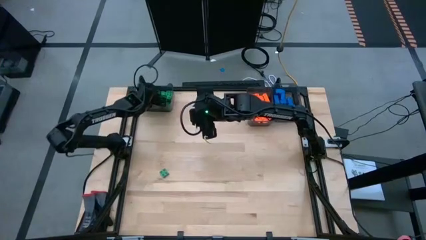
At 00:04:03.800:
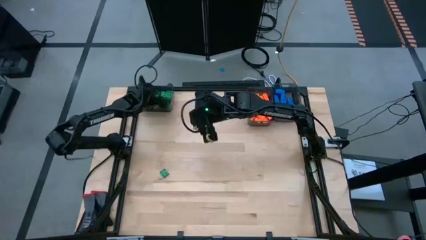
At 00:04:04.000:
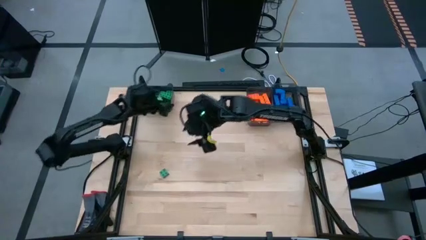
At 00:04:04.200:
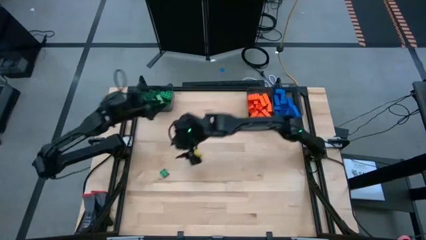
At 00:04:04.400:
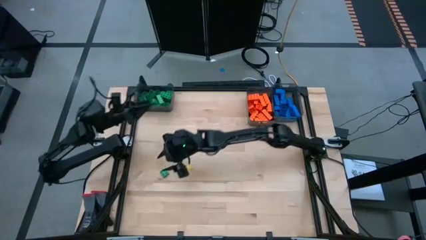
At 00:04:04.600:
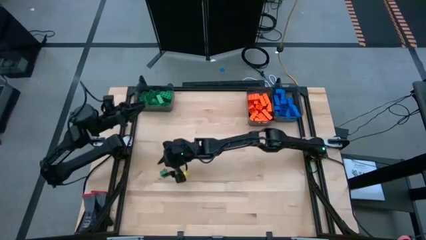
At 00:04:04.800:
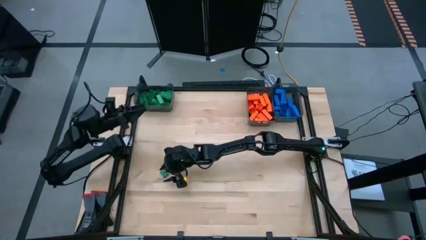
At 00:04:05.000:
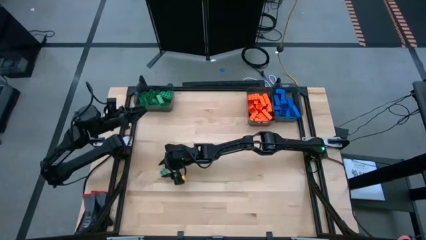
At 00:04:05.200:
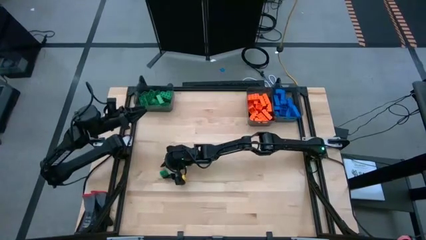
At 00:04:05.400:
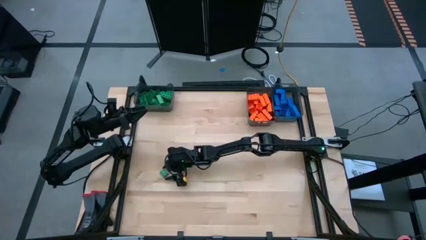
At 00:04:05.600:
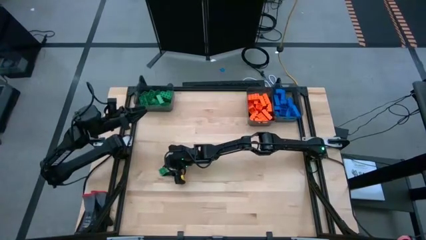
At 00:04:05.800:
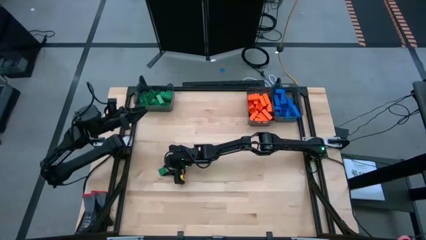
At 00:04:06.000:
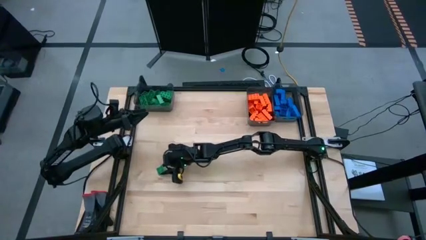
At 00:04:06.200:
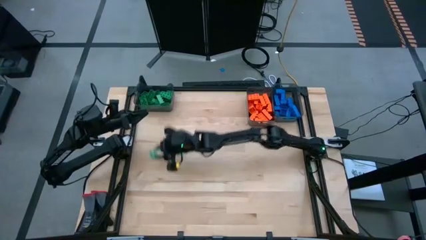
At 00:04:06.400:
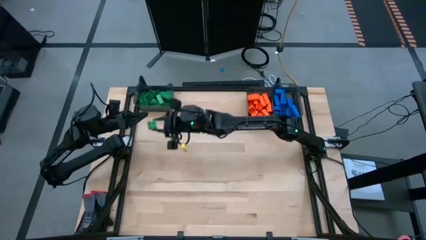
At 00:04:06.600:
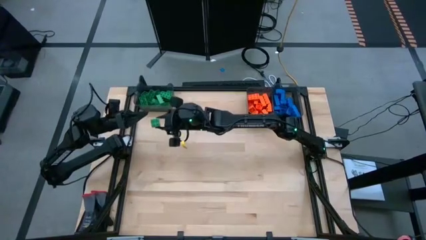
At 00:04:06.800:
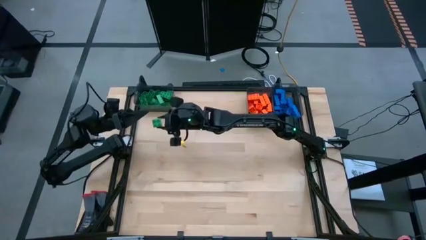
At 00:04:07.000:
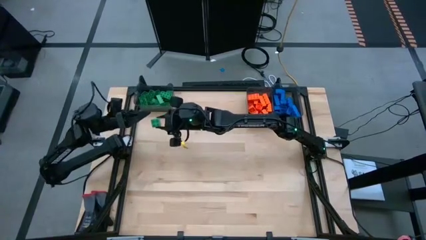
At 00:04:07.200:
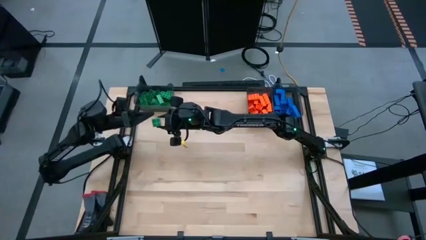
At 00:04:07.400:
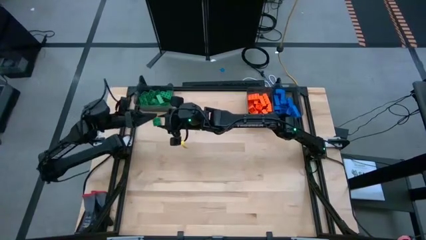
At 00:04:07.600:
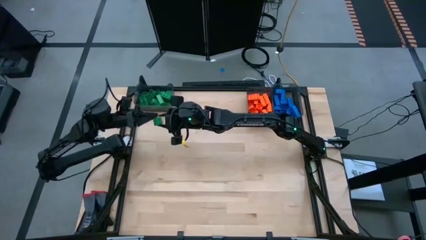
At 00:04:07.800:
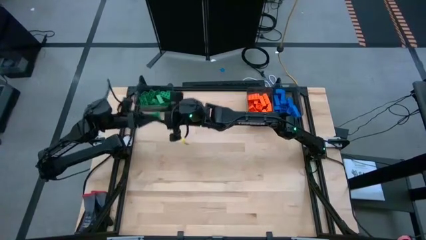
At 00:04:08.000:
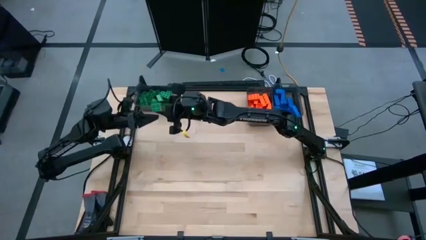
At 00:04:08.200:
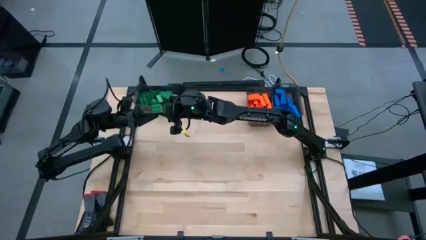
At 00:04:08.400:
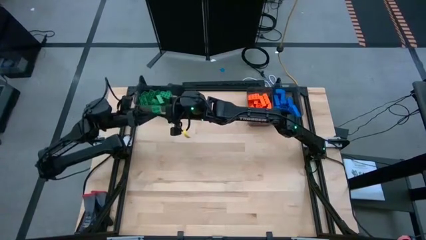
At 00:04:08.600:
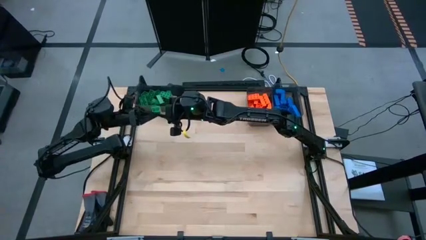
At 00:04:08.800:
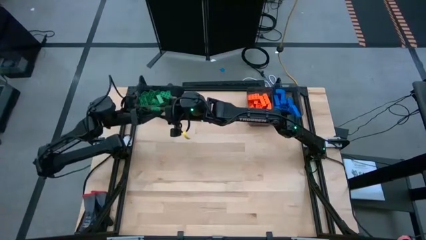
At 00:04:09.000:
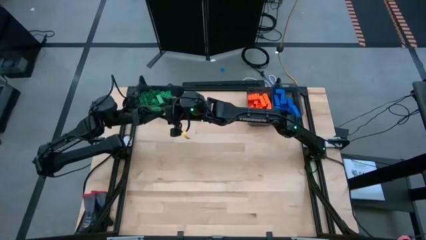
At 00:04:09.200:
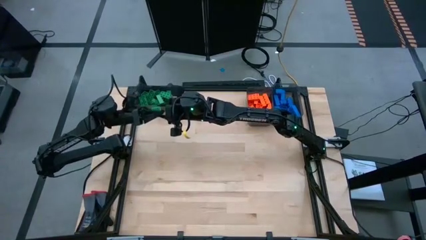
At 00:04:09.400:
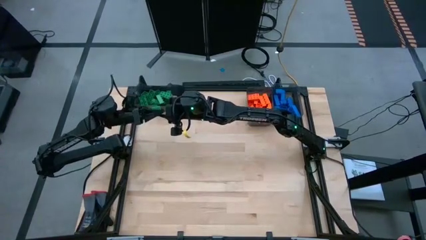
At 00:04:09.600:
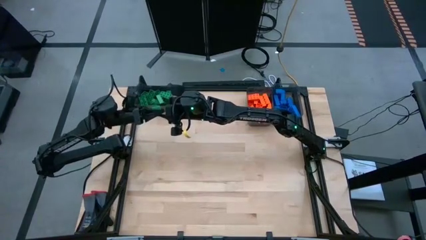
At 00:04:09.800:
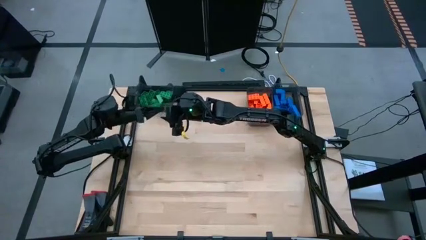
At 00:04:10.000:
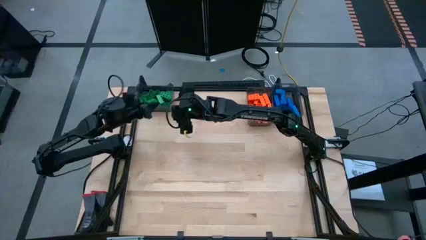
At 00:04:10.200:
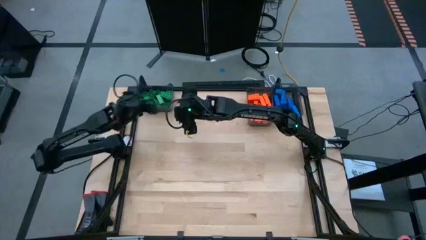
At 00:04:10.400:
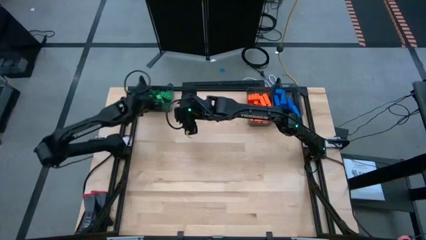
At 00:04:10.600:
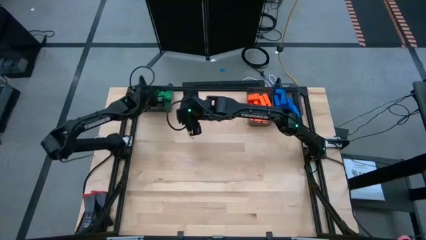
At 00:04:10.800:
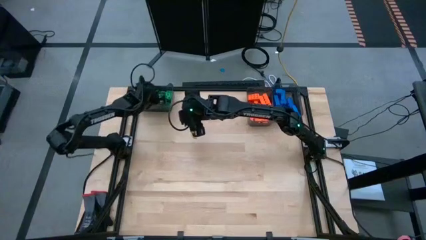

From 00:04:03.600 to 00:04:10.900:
Task: Sort blocks
Put the green game piece into the left black bin

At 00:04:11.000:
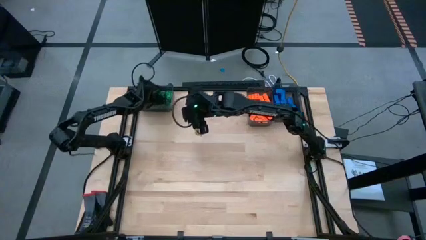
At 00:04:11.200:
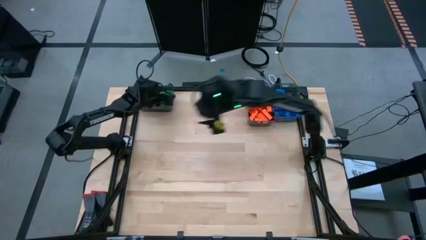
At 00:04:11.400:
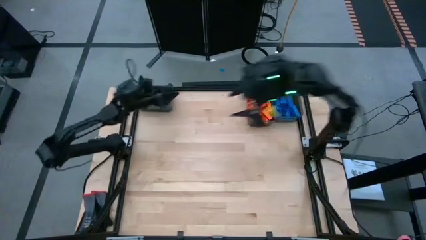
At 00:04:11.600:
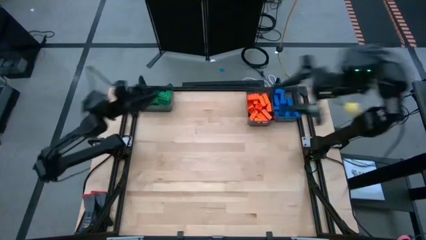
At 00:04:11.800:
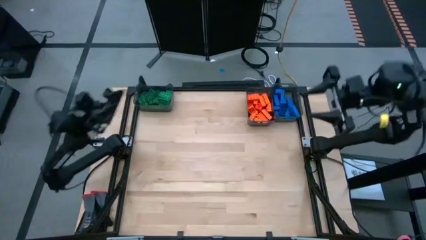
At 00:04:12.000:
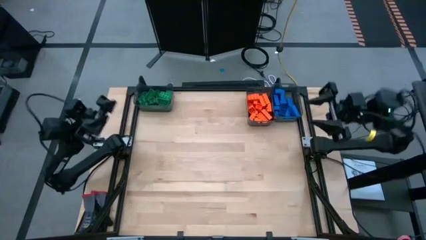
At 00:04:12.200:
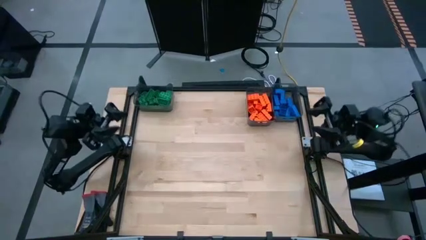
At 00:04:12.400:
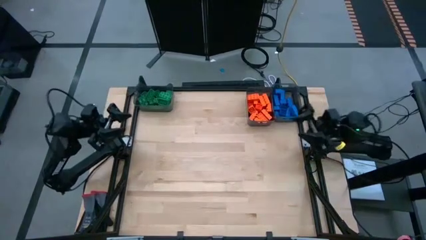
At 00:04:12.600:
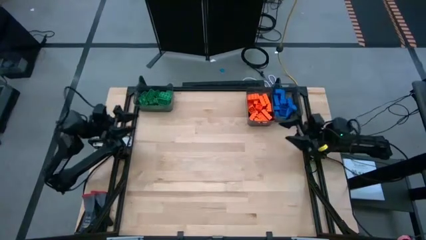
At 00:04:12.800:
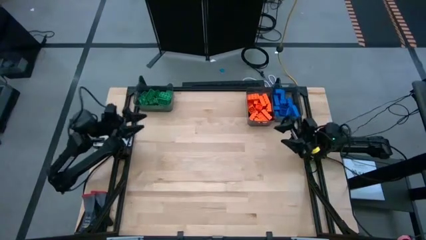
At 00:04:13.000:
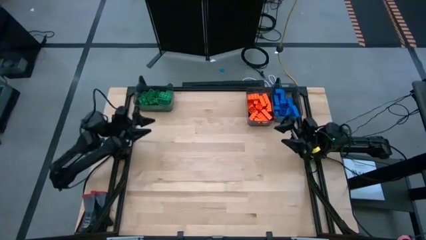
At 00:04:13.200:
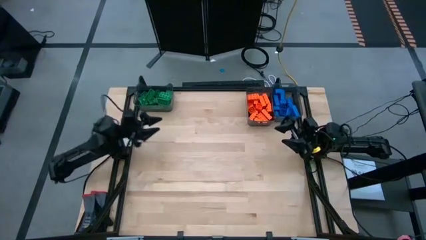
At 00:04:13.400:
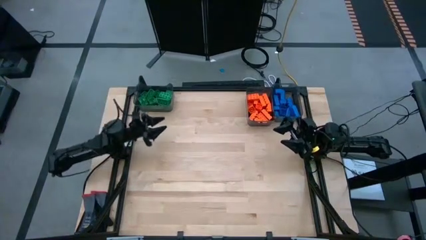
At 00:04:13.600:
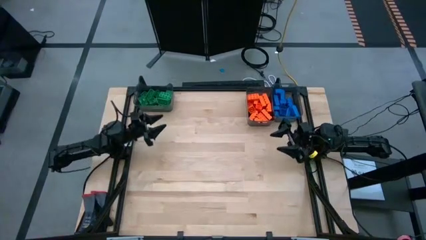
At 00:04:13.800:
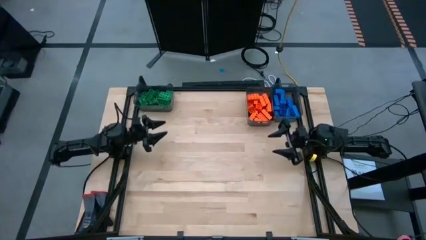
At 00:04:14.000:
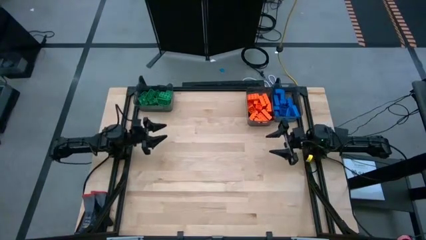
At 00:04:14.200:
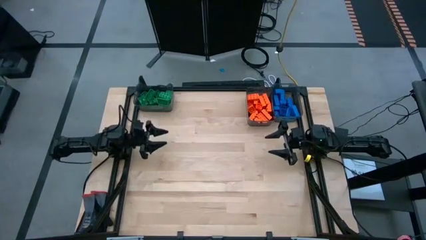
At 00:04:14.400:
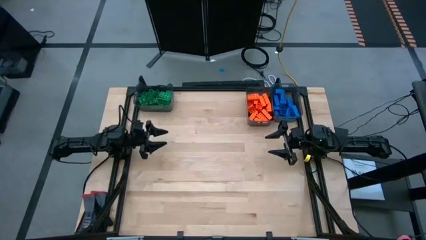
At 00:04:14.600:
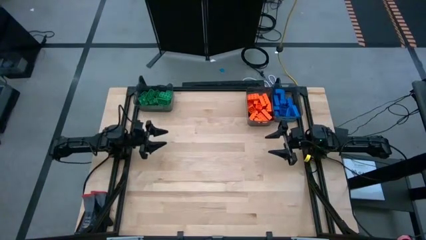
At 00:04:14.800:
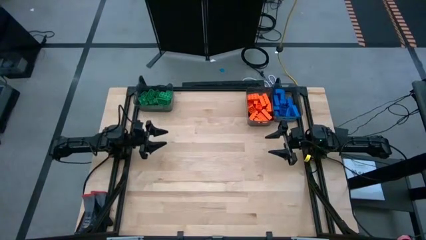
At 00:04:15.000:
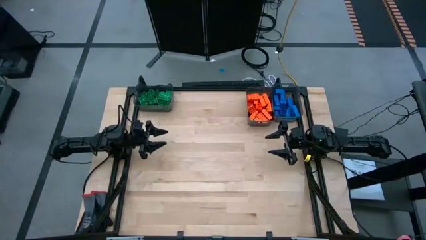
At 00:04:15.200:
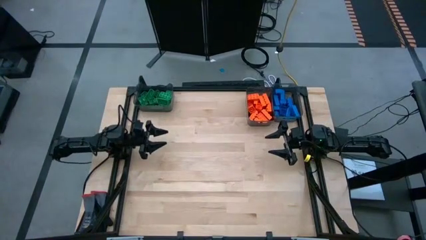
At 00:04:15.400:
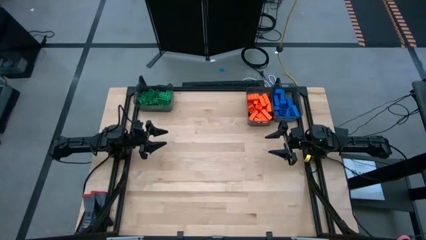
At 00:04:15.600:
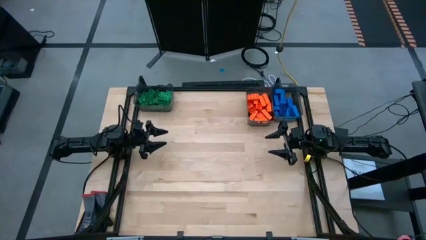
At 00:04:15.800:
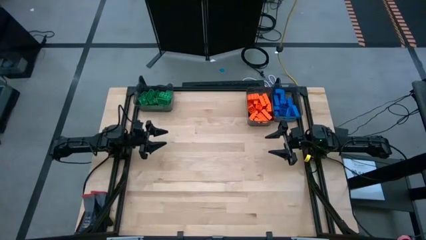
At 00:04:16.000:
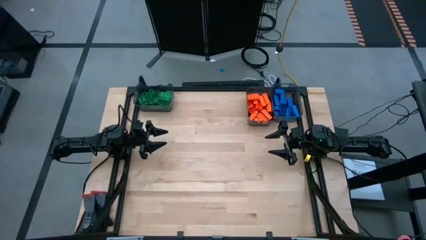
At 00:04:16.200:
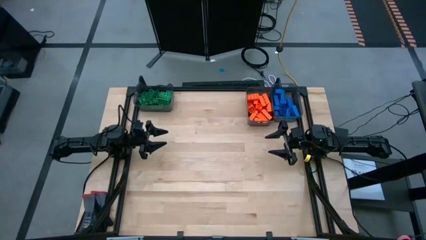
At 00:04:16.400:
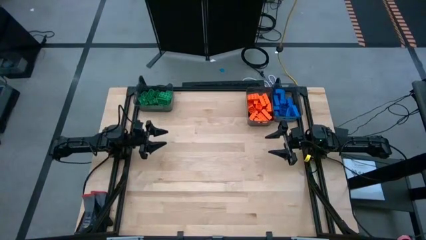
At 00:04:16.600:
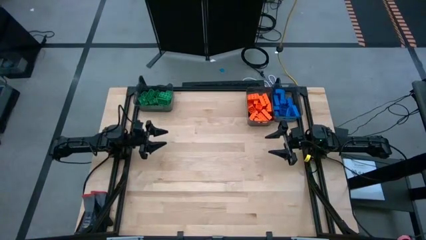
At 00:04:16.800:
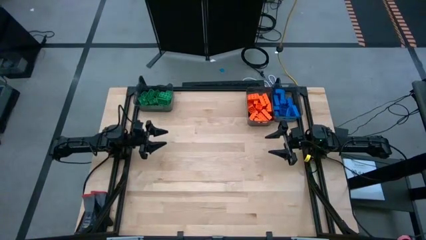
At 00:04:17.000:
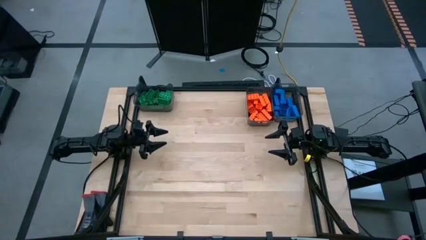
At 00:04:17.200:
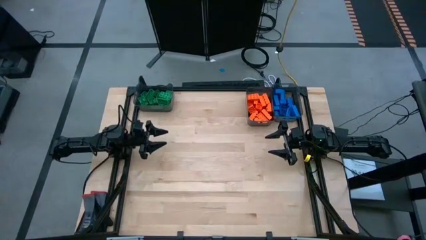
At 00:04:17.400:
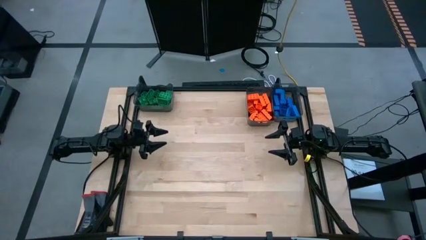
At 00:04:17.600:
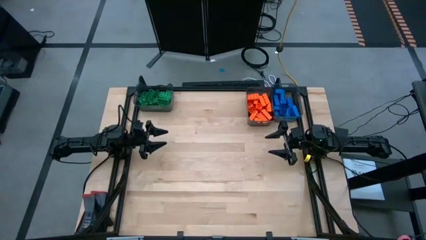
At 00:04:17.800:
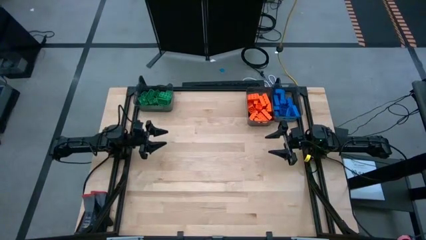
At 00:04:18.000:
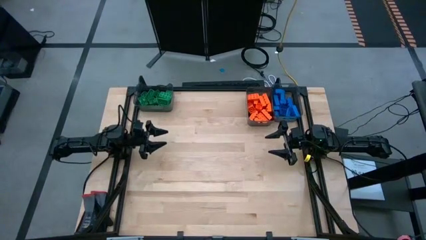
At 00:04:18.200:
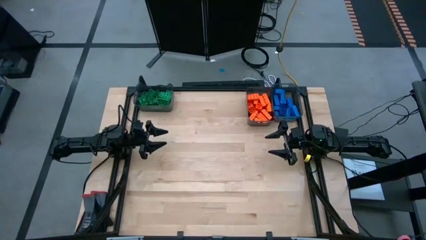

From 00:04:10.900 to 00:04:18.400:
Return to Home Position
